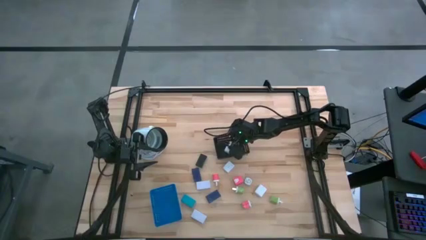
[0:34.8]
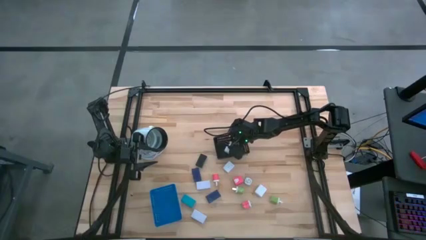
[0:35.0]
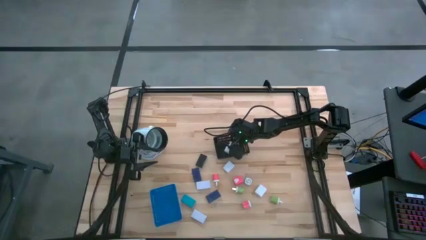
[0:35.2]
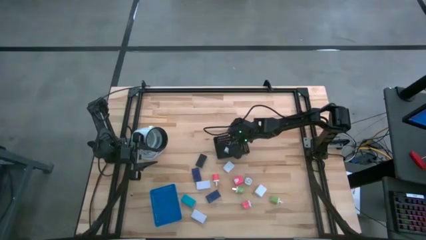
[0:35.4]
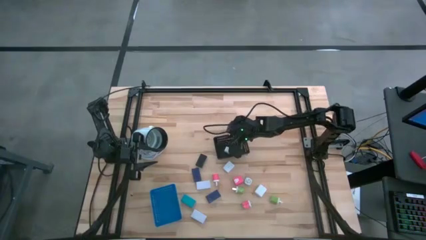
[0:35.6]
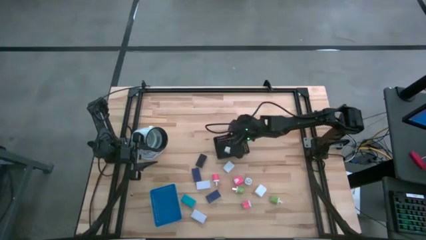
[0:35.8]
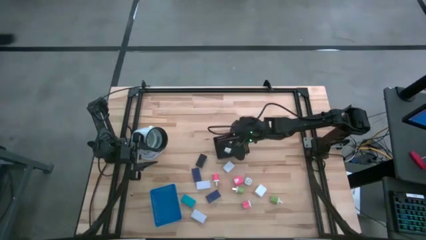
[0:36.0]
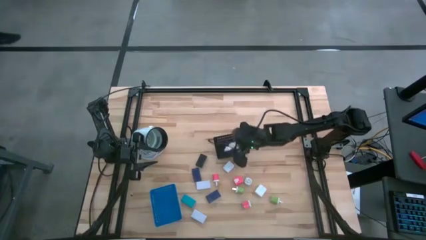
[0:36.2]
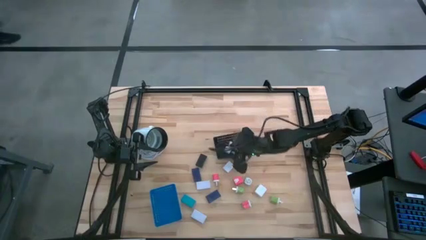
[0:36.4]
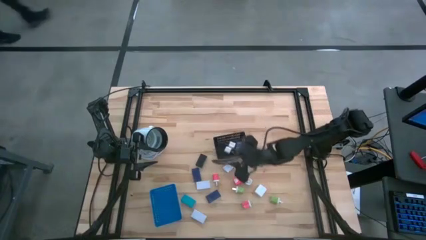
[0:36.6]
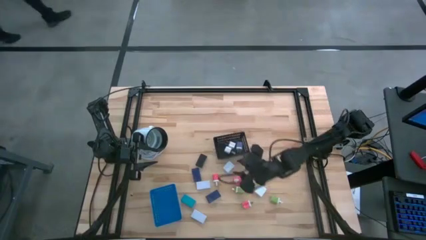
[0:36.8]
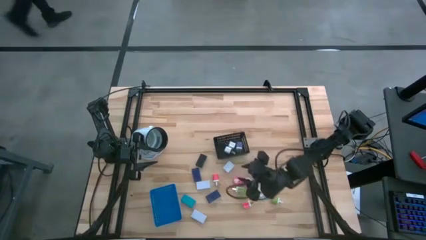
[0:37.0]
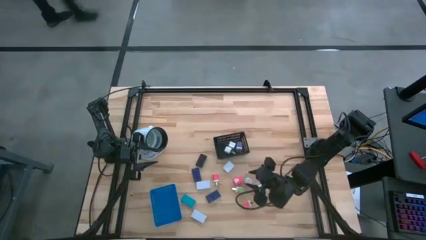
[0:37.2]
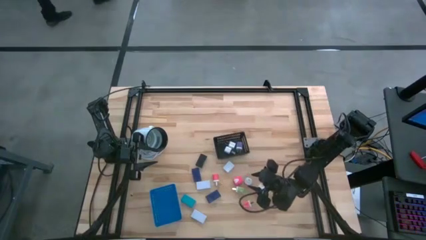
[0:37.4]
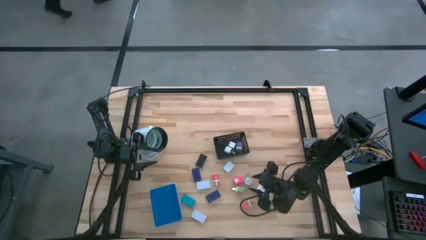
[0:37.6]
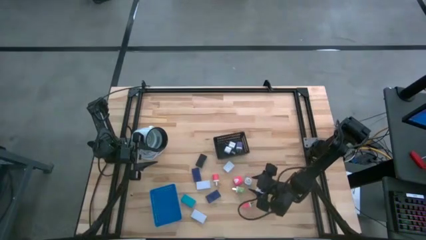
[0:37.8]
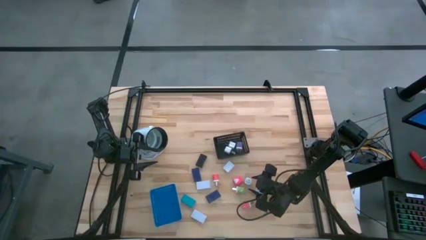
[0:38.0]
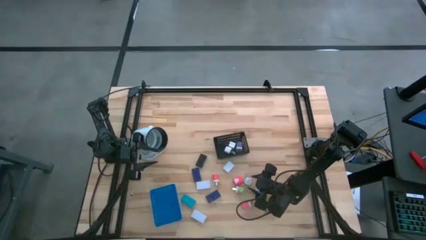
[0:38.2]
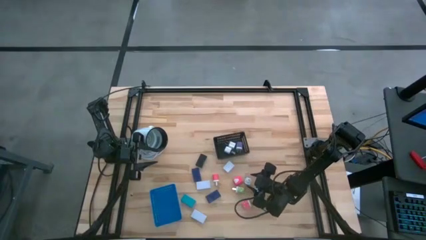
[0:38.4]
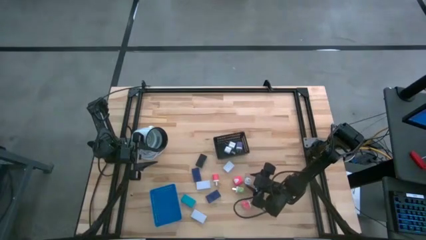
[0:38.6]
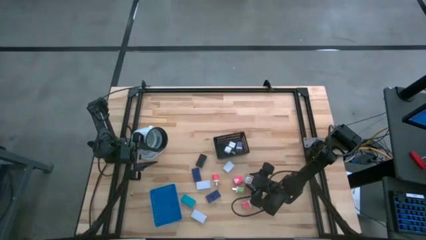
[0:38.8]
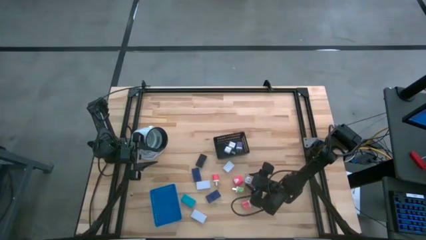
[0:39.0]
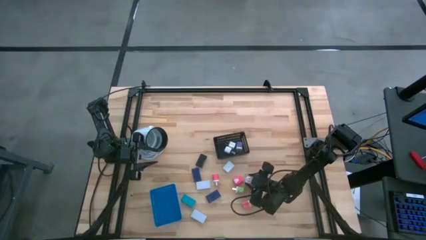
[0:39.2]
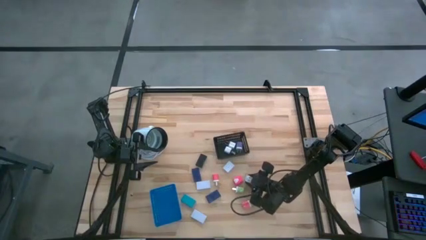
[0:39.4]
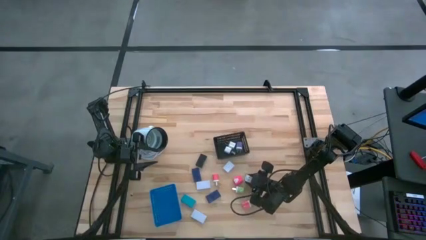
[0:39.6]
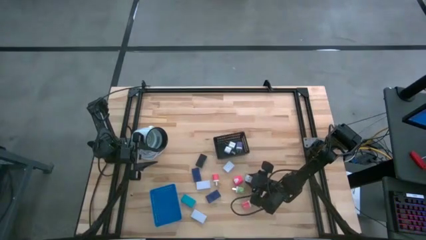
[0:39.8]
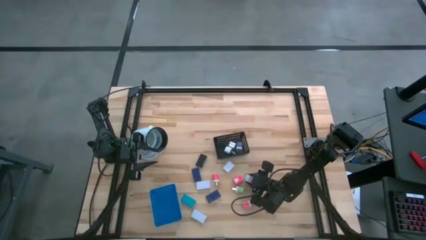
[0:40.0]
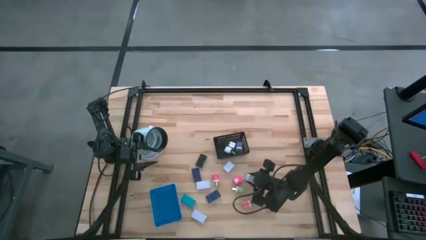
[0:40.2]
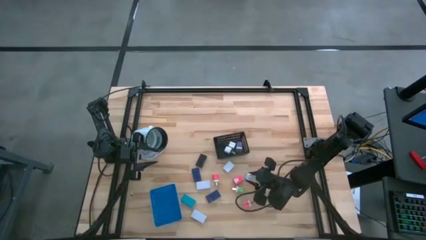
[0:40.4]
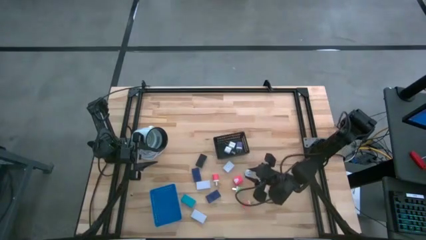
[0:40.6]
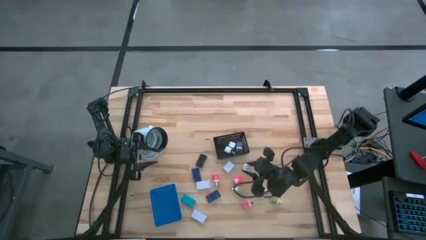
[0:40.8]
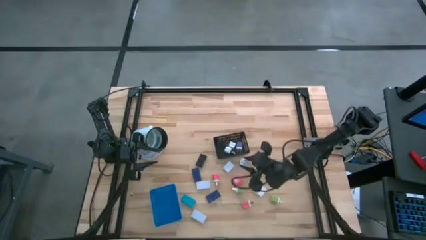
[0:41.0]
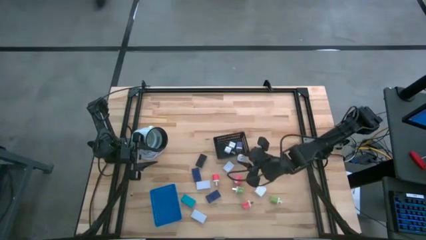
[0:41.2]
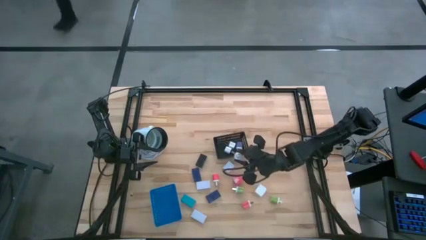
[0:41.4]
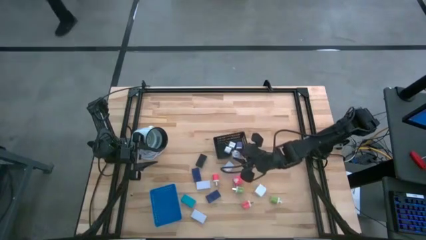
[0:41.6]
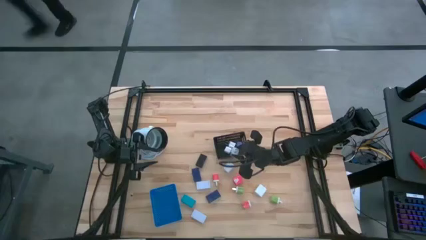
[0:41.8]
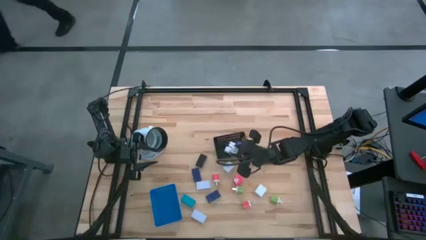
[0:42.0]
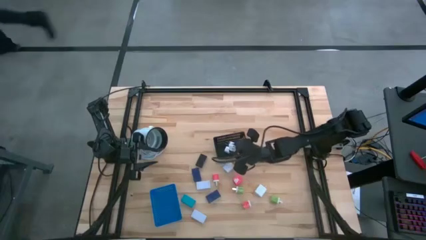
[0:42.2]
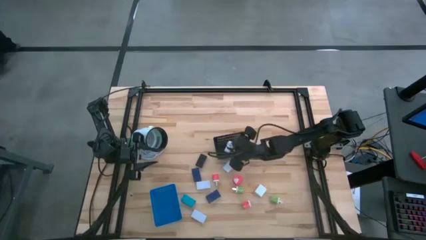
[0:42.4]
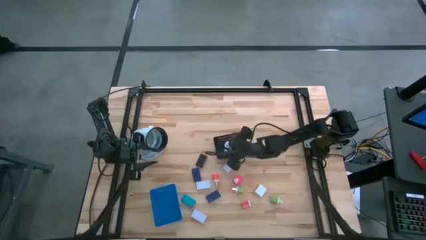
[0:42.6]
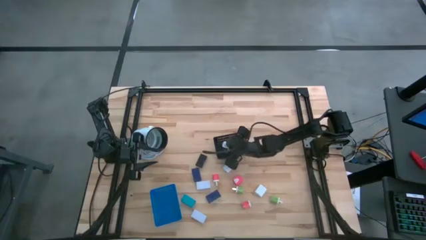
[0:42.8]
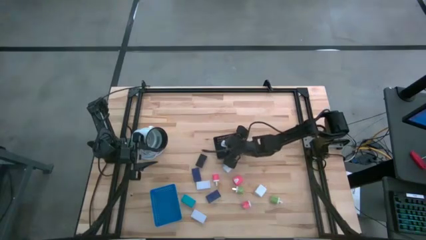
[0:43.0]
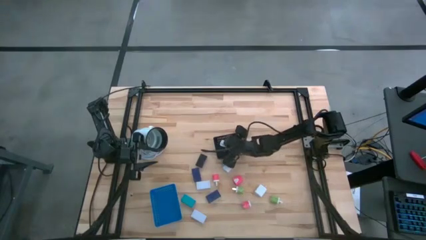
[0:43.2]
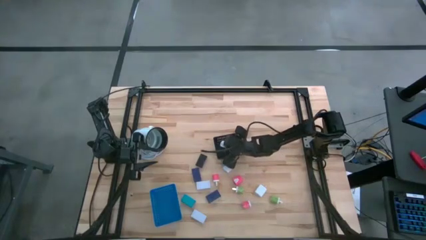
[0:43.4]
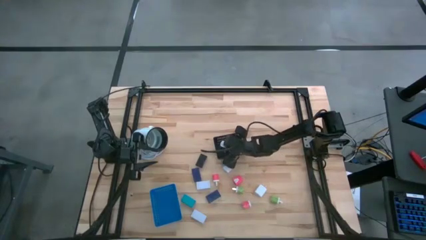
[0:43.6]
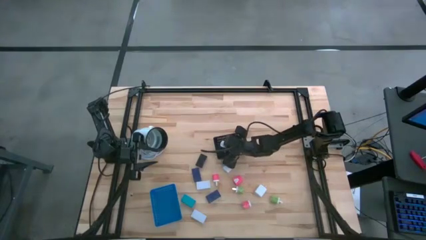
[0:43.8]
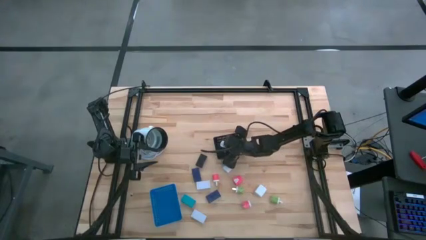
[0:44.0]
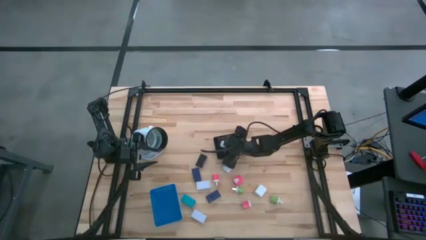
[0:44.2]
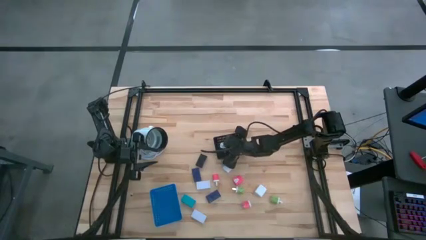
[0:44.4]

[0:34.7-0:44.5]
Task: Pick & Place Office items
Put the blue charger adapter into the black bin

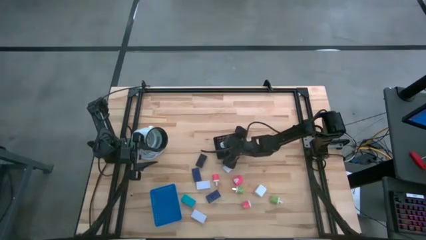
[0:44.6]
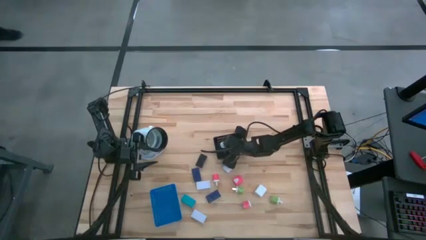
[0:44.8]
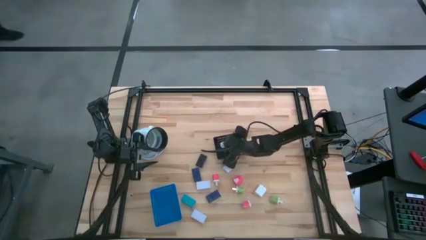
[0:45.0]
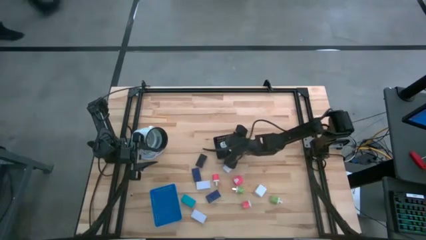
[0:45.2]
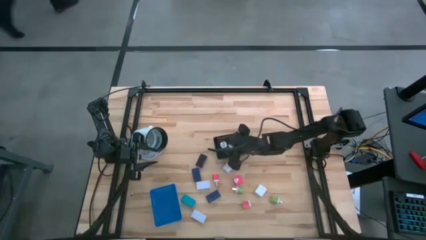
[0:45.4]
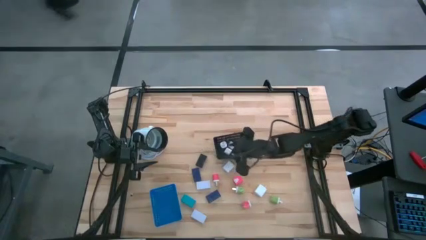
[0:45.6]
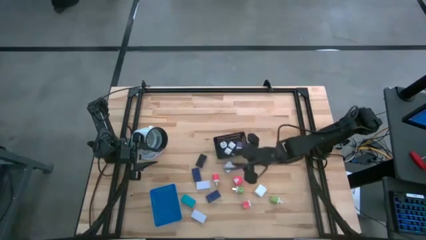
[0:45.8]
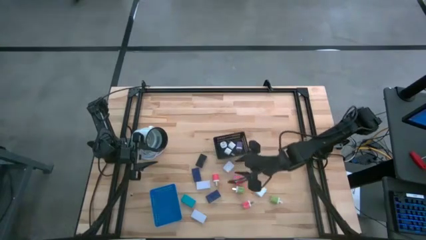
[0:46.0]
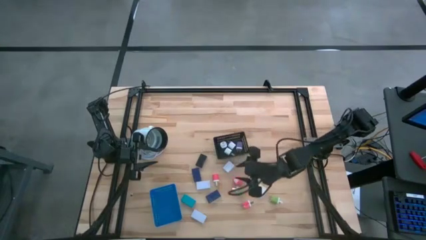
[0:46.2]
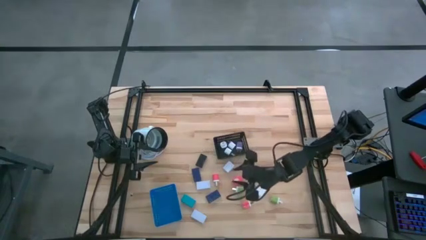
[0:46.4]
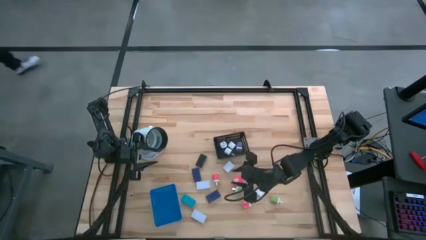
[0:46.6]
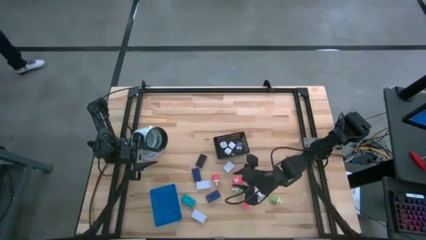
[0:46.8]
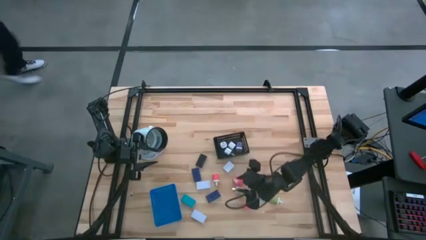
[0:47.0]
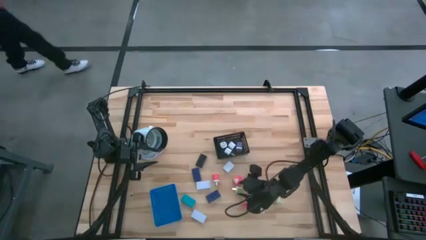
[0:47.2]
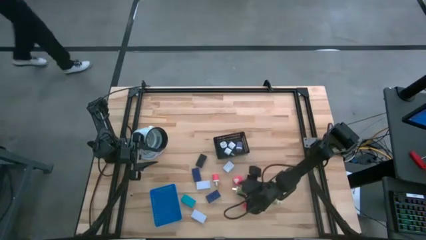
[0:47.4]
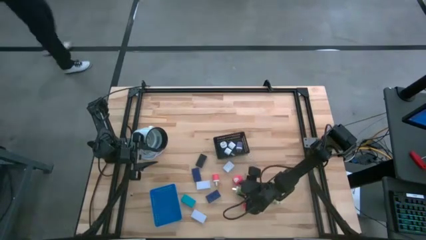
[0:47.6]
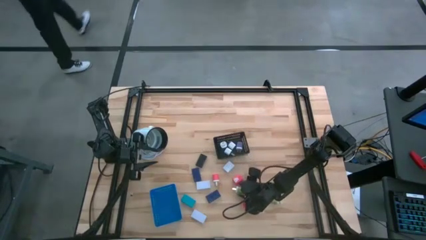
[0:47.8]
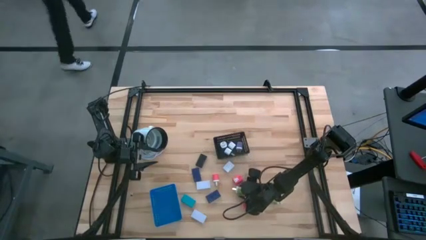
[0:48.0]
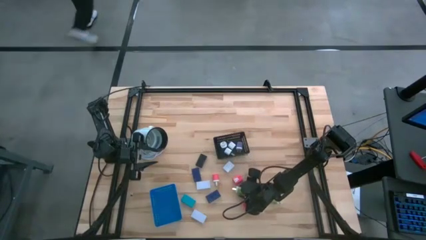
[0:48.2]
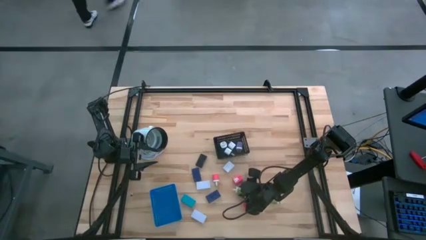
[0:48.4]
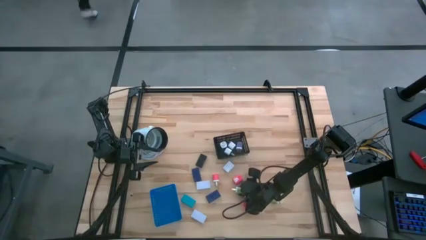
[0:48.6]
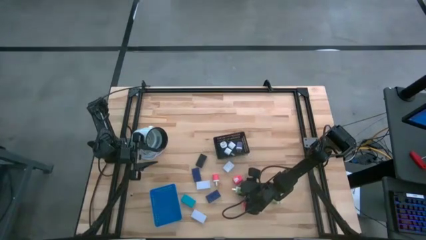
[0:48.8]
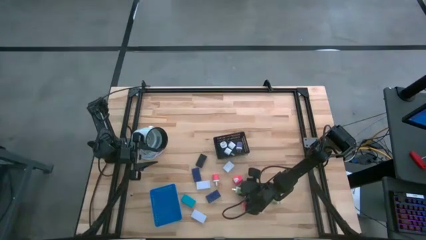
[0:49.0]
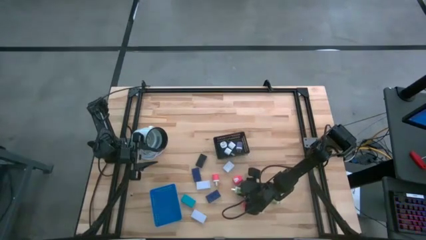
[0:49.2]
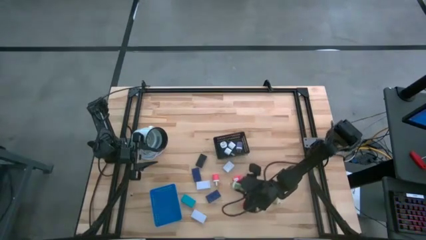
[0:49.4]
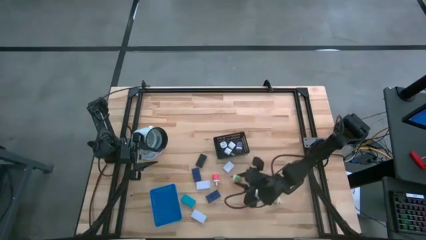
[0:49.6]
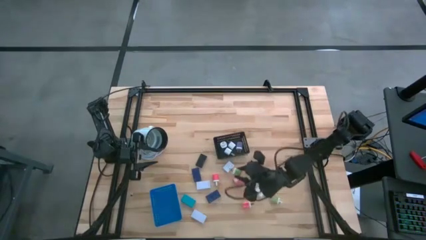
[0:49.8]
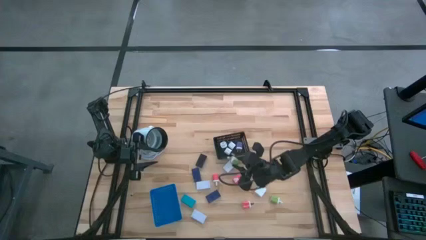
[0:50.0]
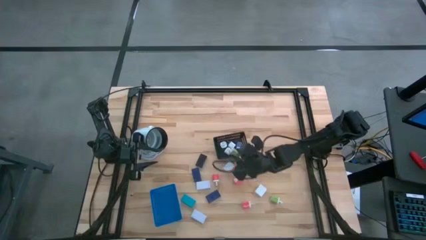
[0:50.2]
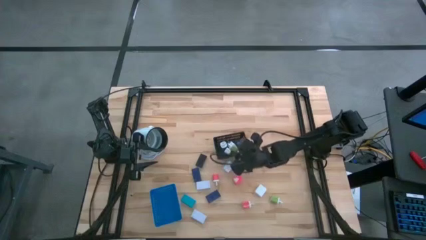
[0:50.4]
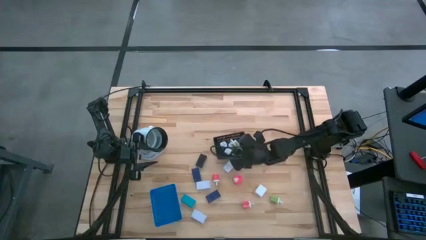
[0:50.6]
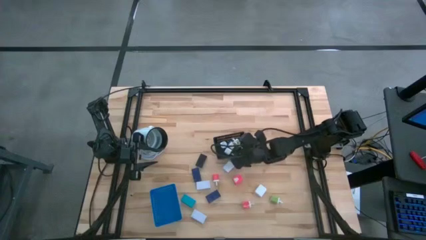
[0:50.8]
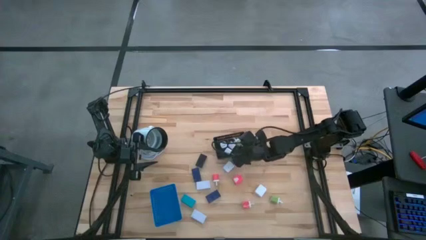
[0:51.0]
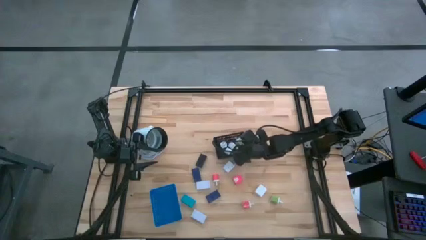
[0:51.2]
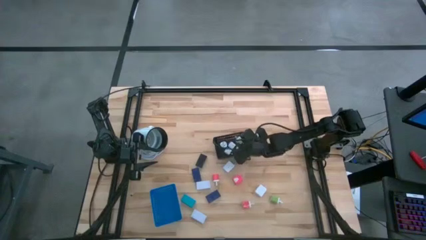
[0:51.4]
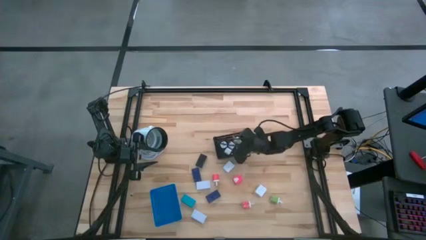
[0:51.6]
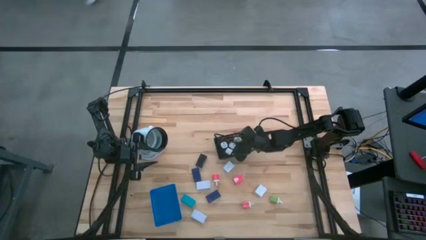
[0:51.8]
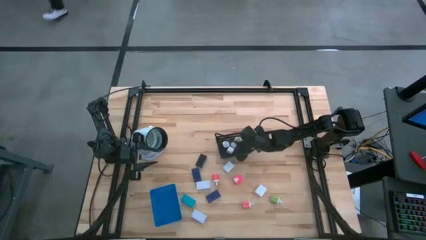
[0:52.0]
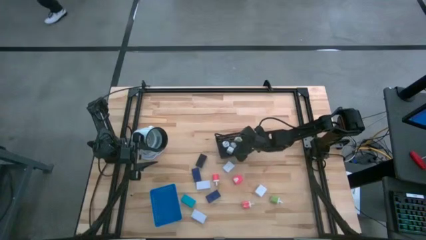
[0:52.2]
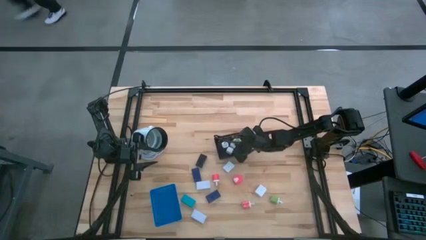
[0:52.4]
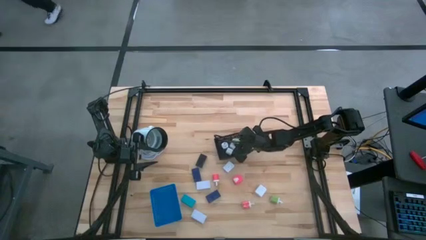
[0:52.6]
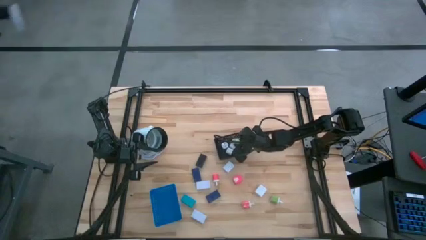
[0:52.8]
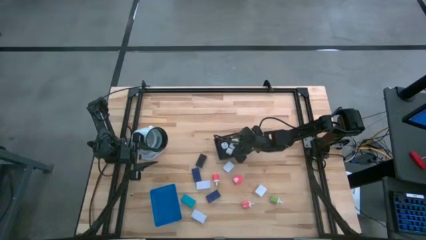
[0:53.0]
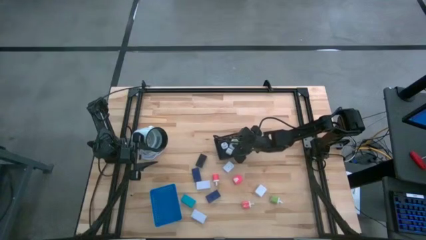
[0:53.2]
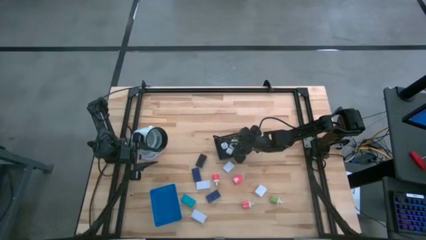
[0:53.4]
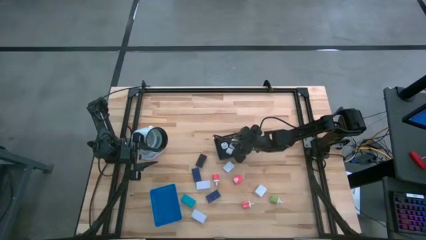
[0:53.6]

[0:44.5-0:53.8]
Put the left green charger adapter into the black bin
